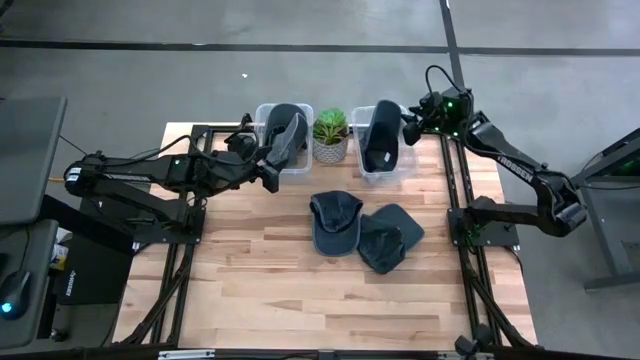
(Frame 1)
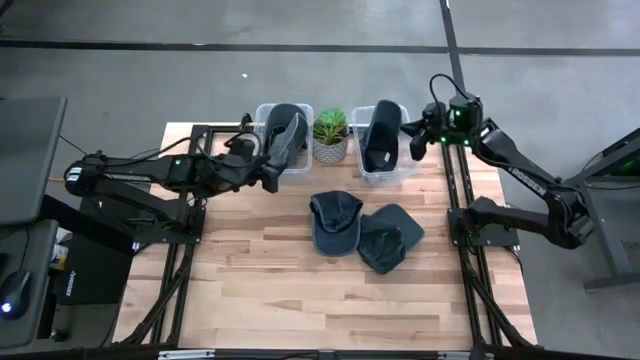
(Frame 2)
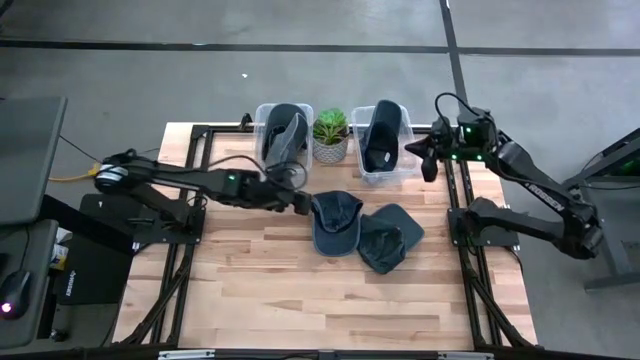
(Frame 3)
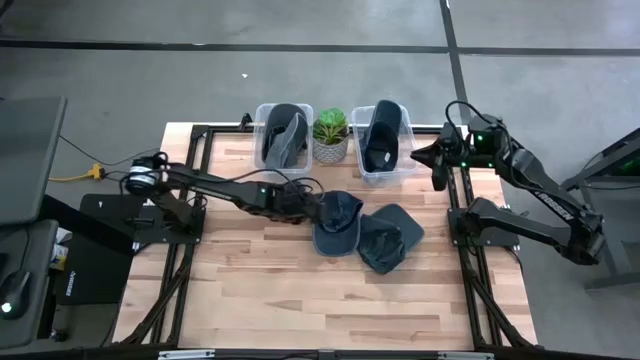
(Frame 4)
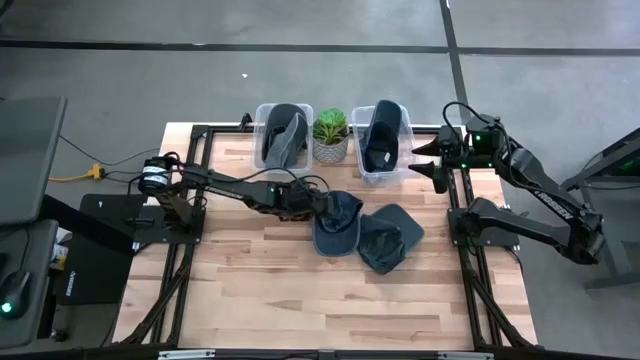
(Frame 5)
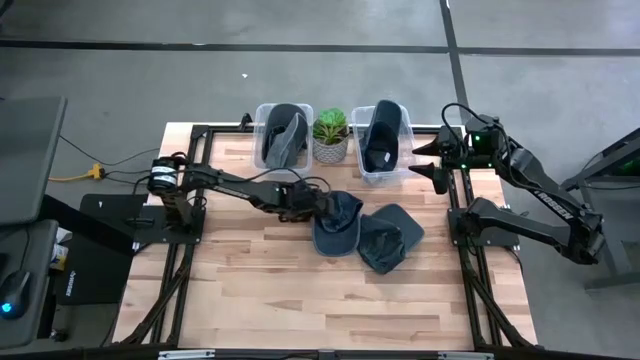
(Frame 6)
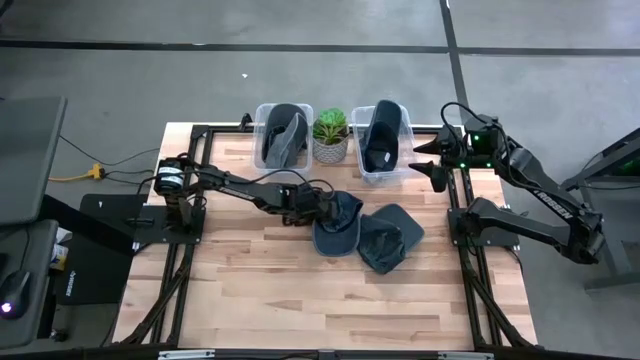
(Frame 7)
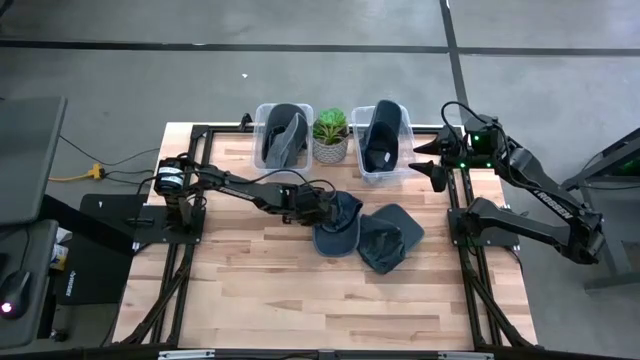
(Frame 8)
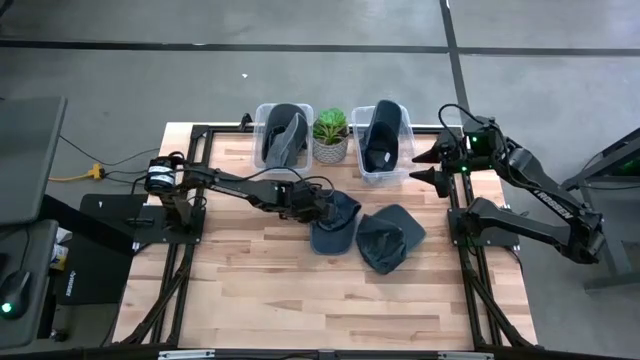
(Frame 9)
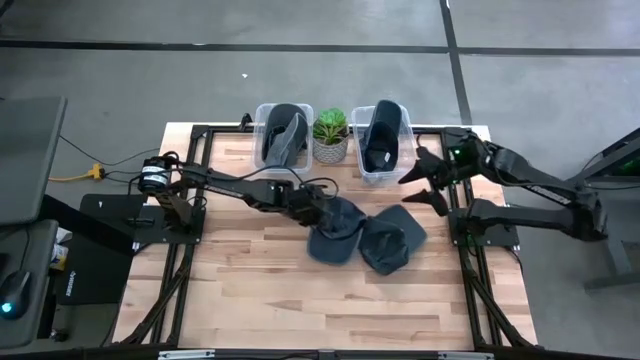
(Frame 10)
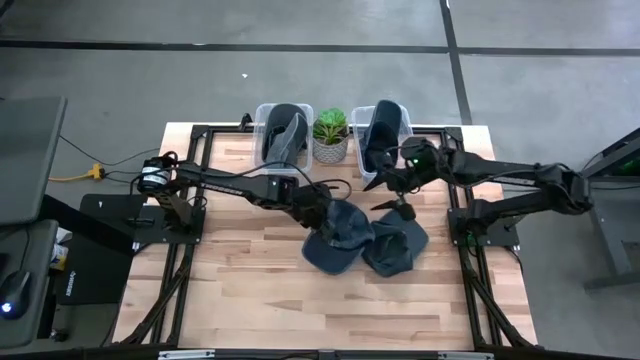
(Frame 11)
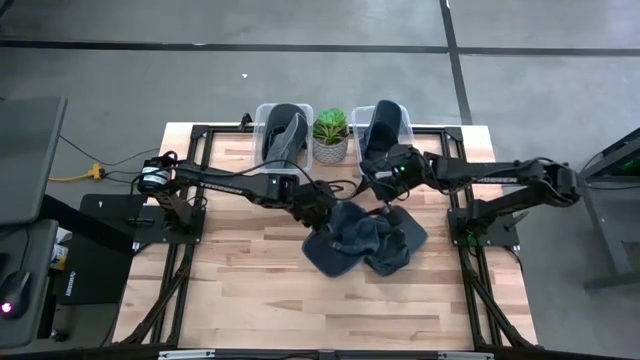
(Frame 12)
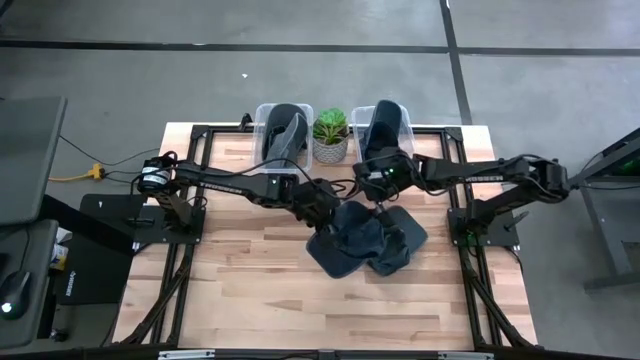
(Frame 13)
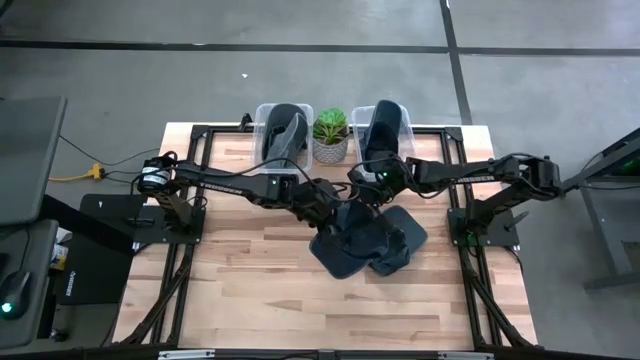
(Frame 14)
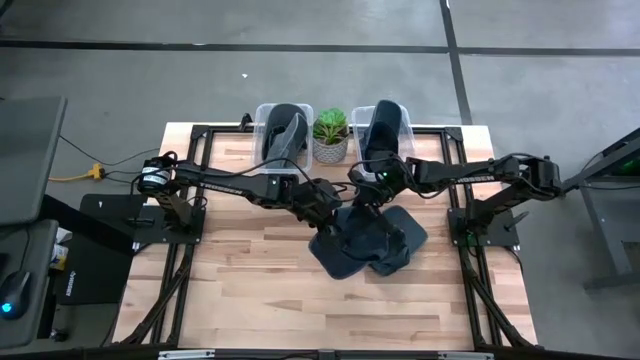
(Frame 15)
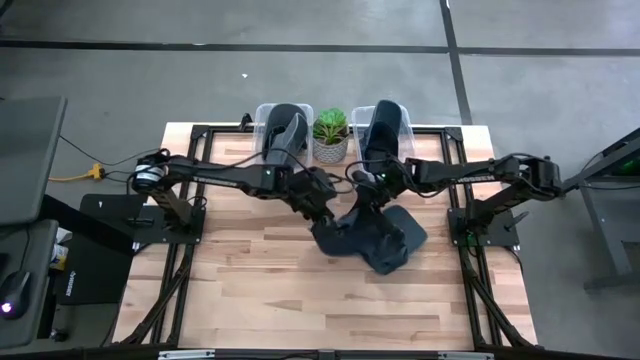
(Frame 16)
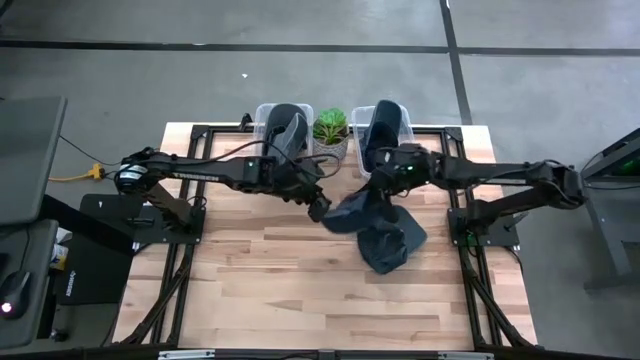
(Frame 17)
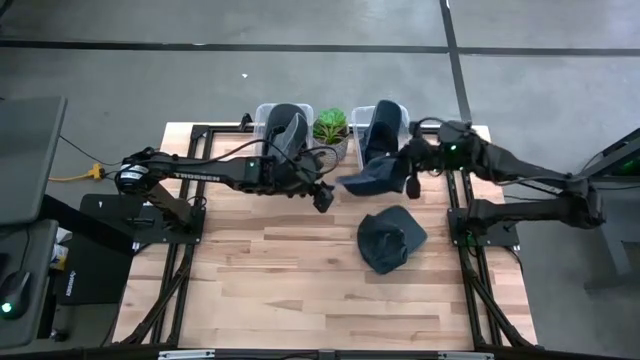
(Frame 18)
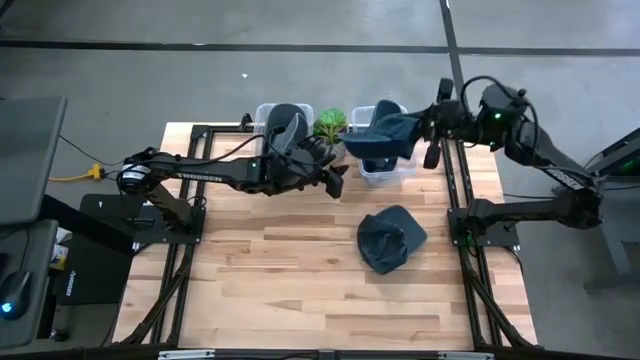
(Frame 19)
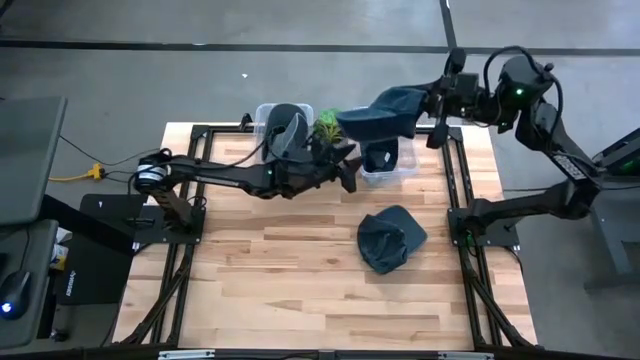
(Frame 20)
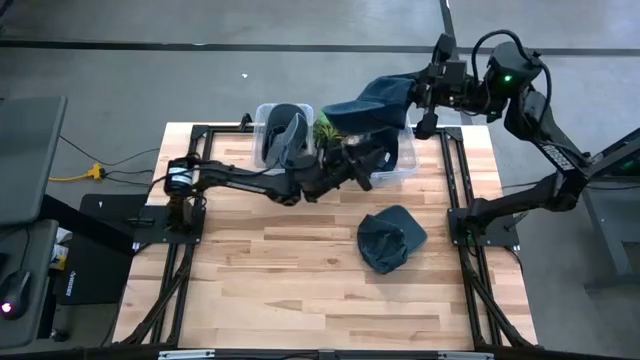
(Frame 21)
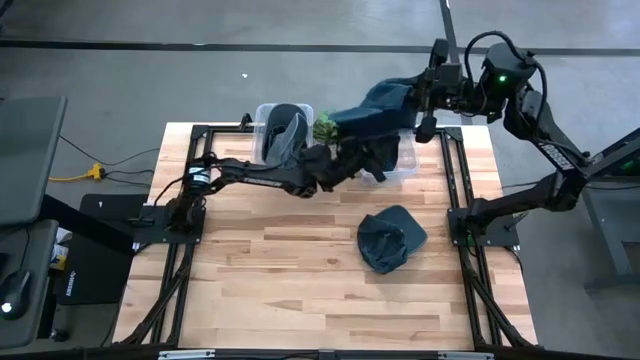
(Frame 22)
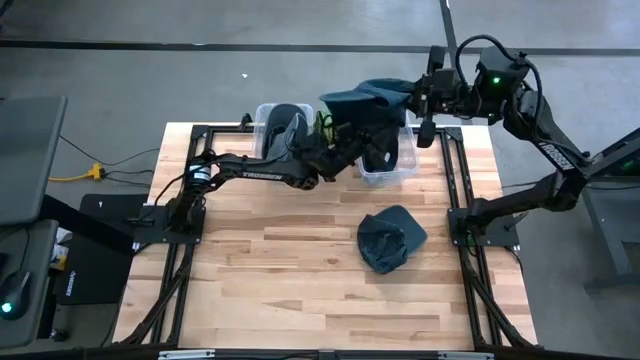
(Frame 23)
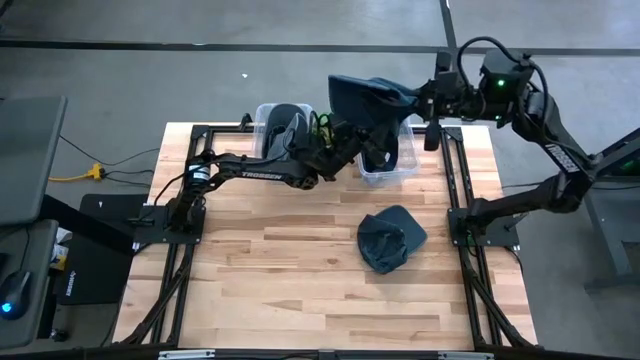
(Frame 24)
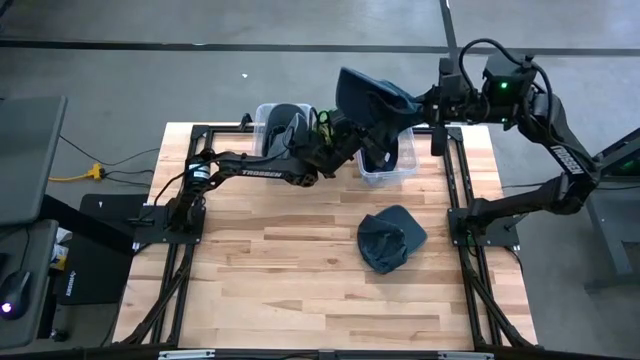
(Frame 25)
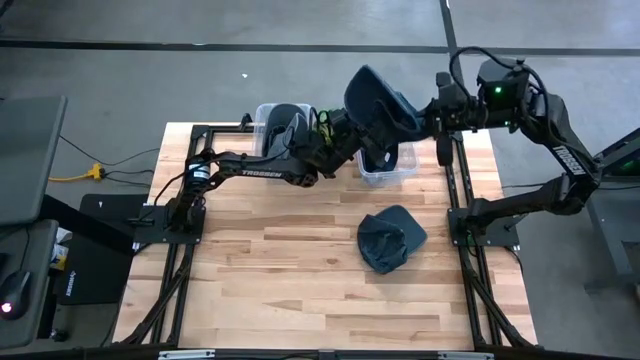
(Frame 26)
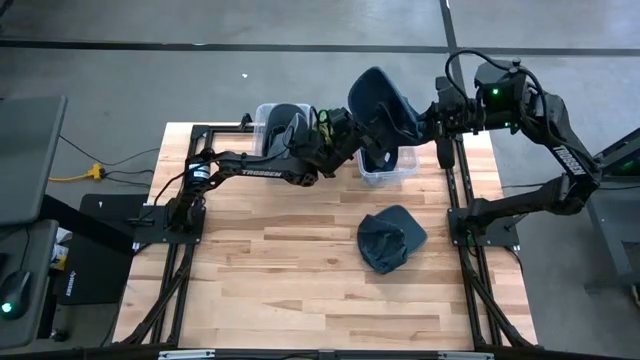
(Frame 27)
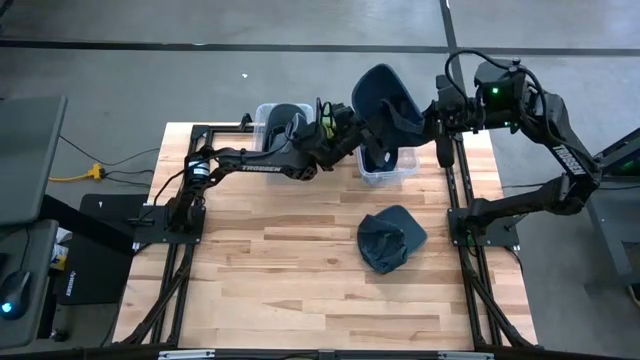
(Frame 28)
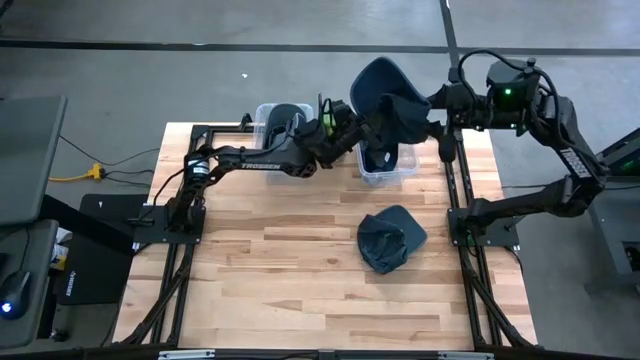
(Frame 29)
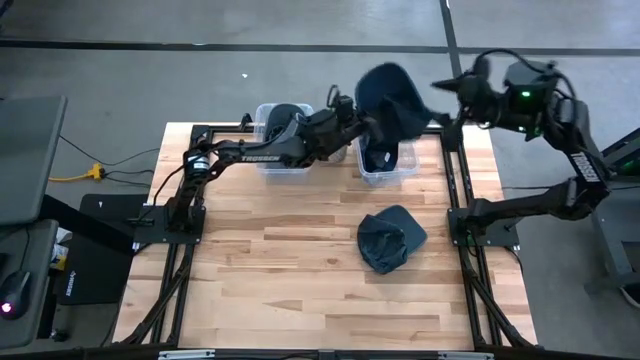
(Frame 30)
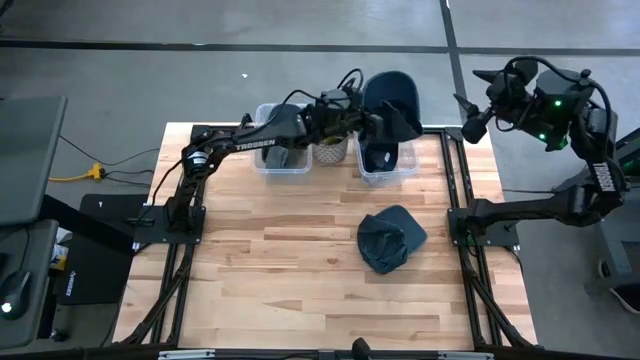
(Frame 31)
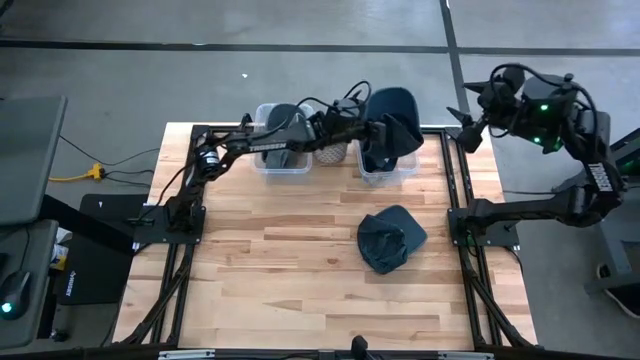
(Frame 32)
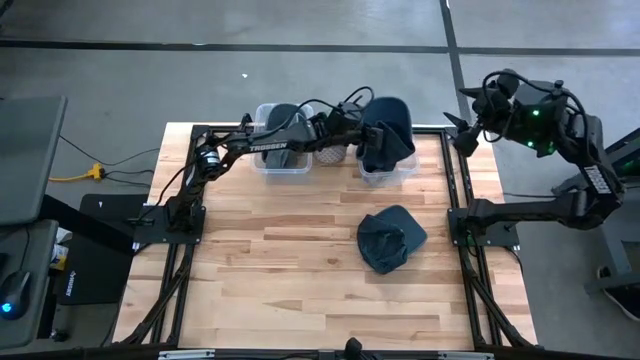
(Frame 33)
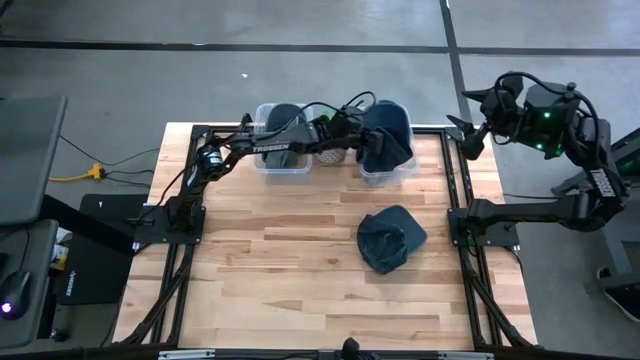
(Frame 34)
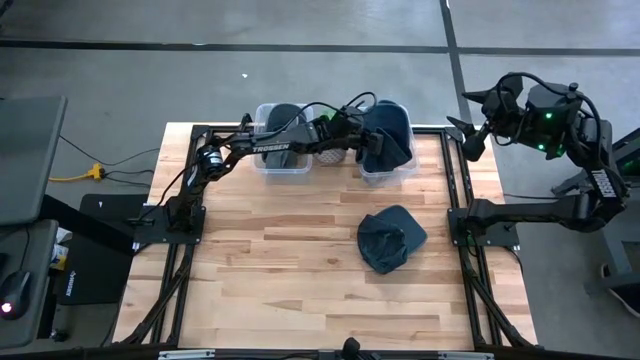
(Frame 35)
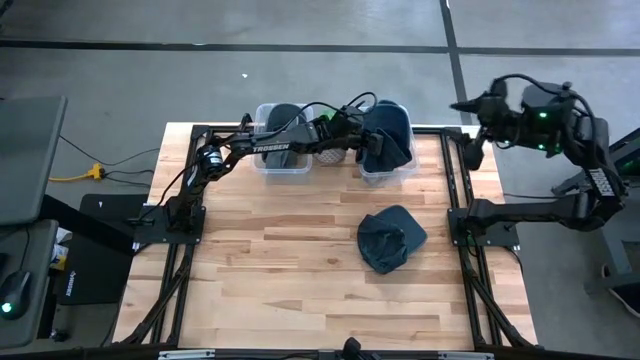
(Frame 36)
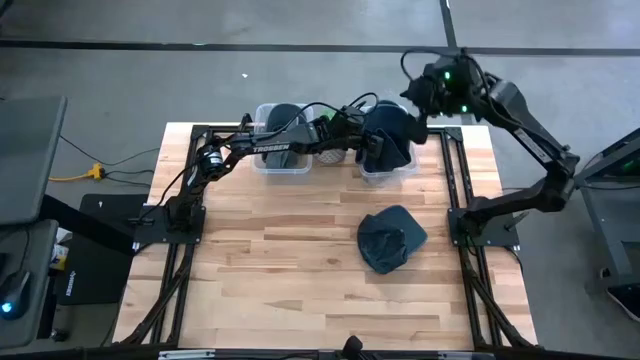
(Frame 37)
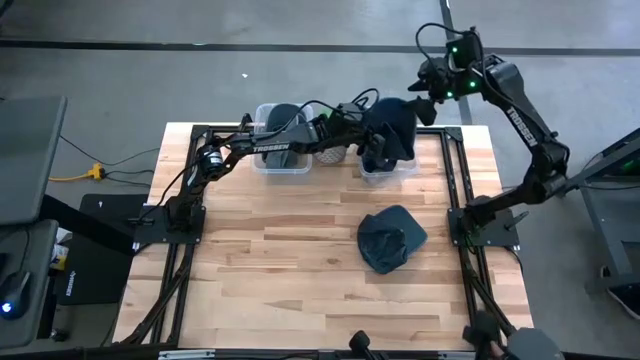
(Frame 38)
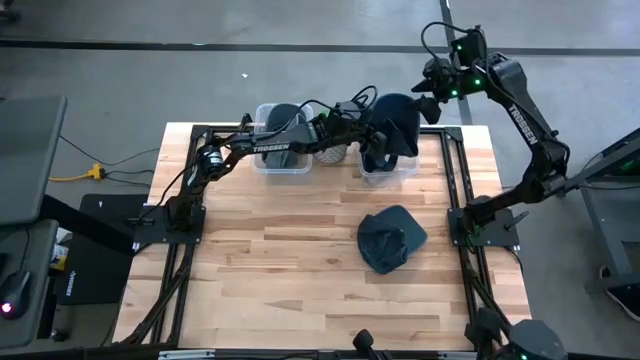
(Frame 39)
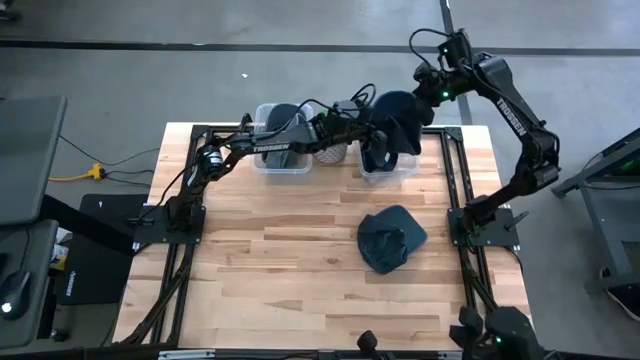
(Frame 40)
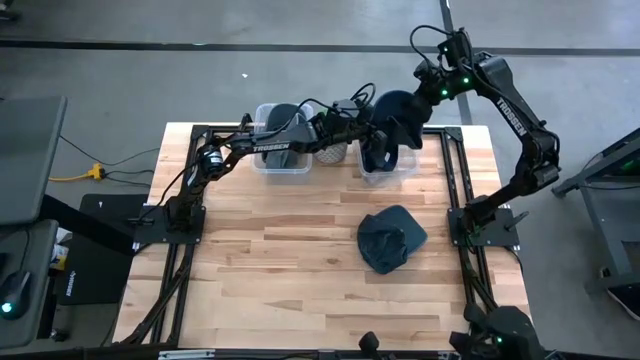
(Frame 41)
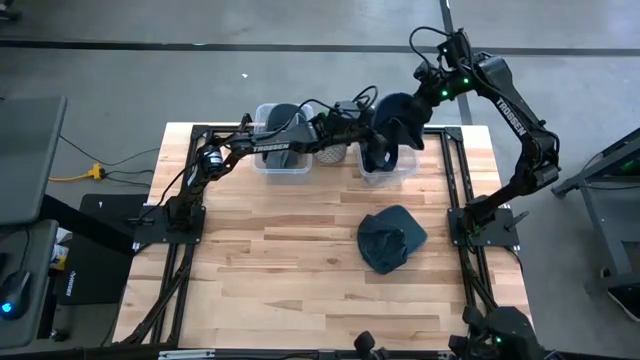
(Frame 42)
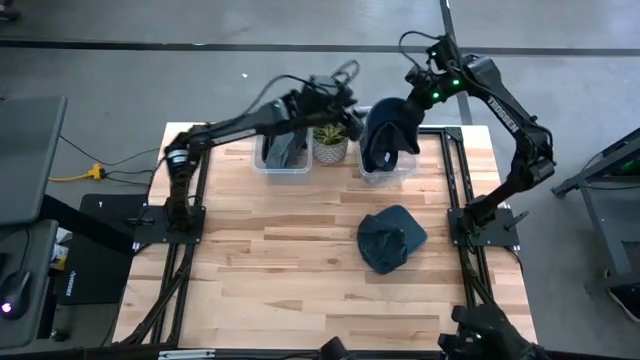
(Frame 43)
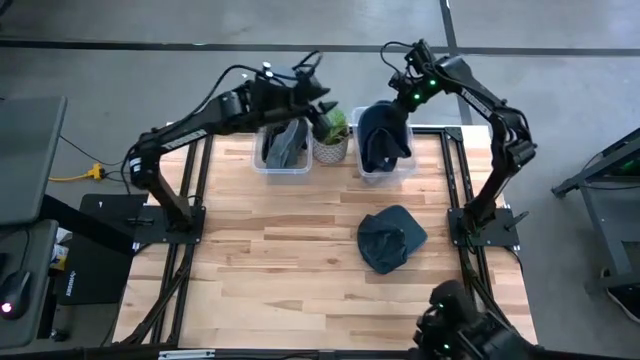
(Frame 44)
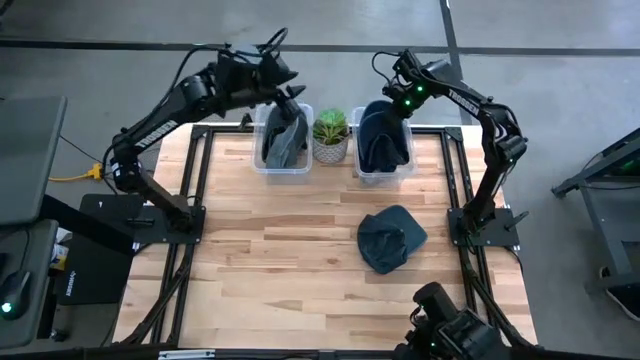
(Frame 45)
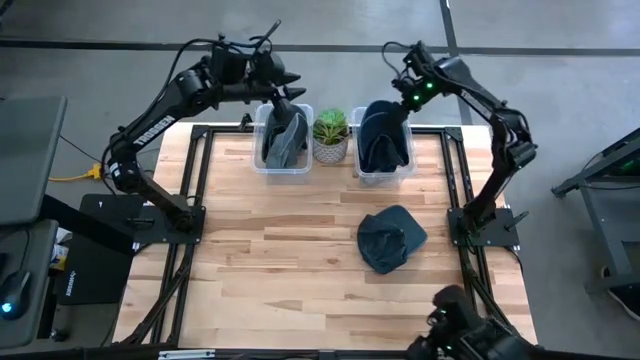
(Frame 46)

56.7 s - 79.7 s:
Task: Pick & Place hat
Put the left blue cap into the right transparent bin
